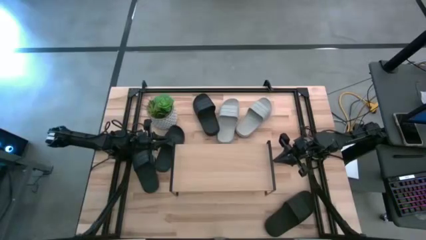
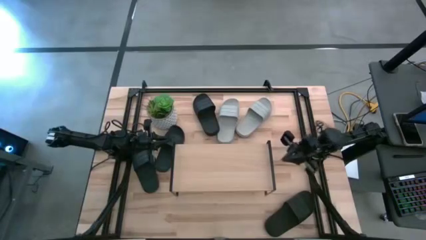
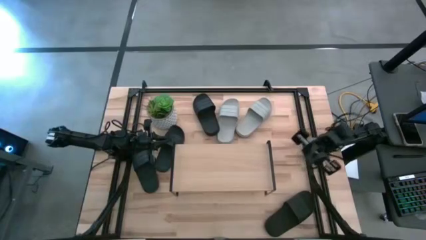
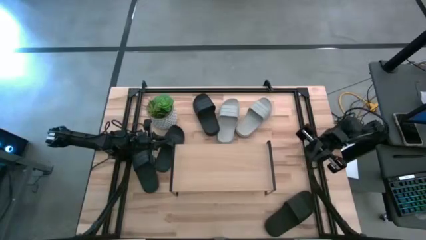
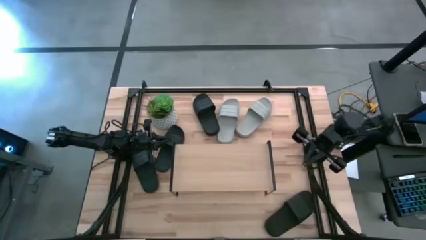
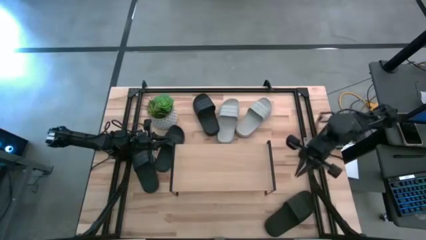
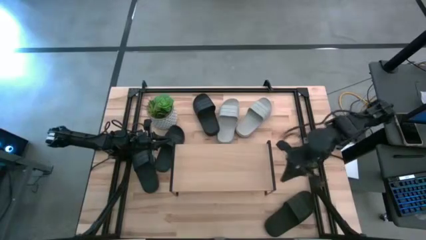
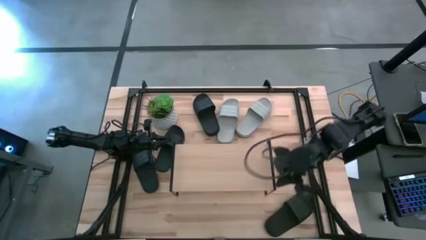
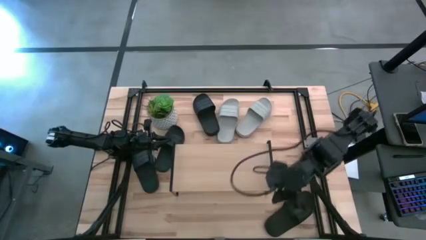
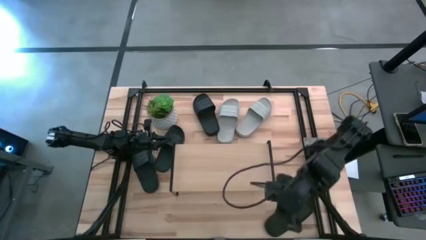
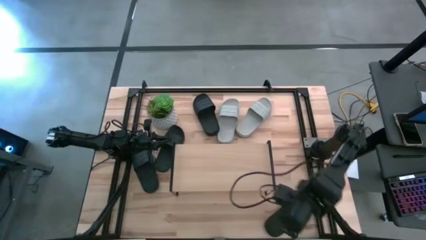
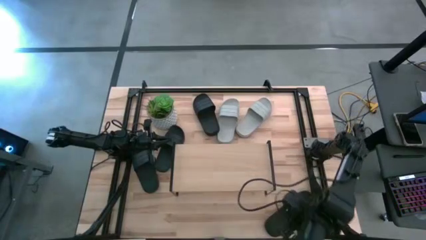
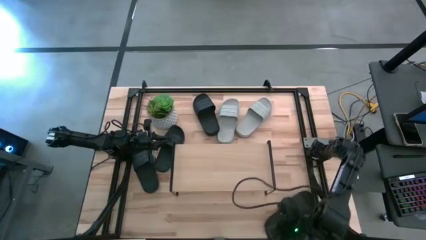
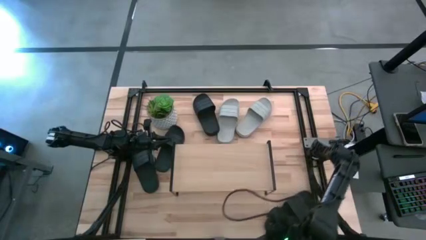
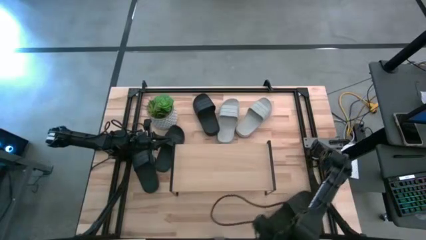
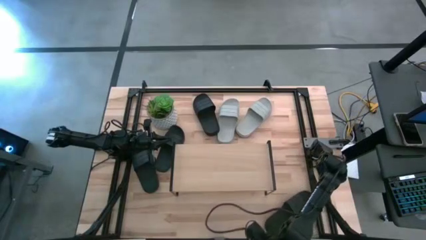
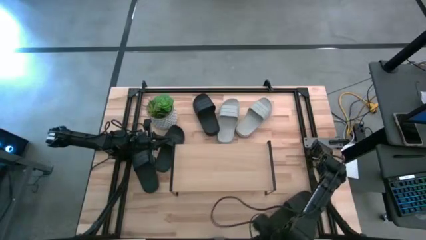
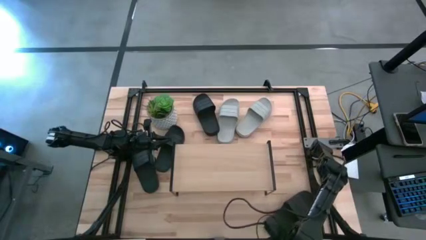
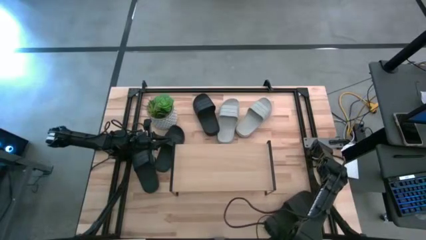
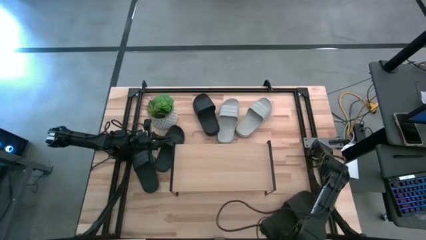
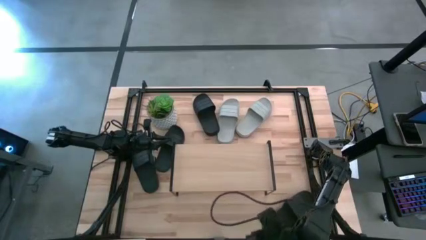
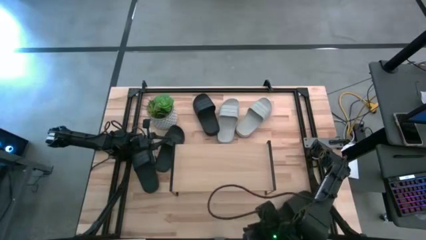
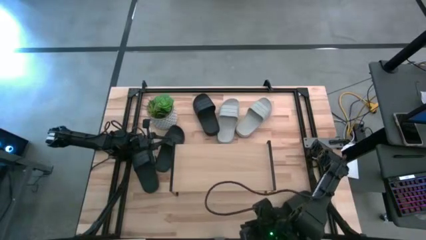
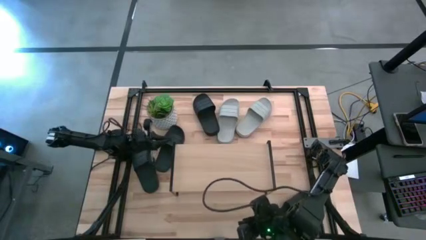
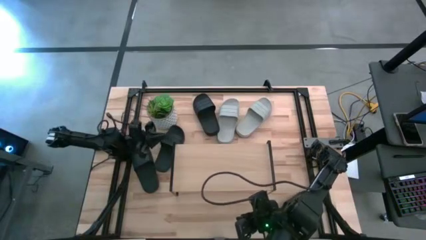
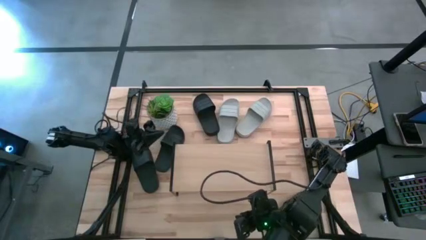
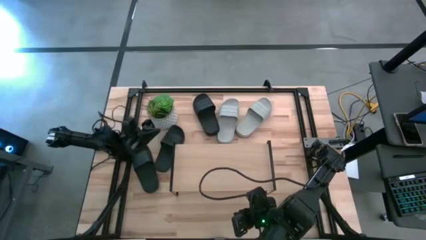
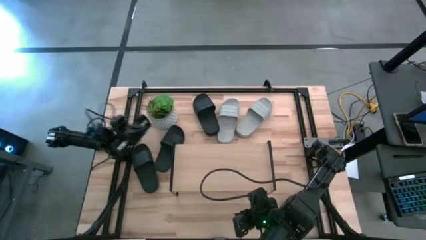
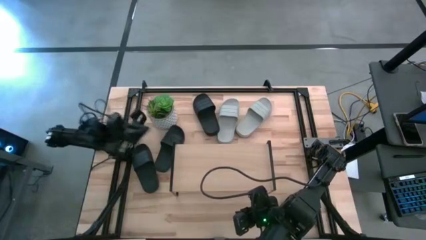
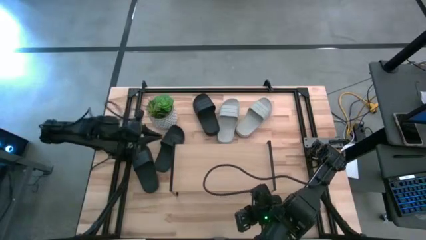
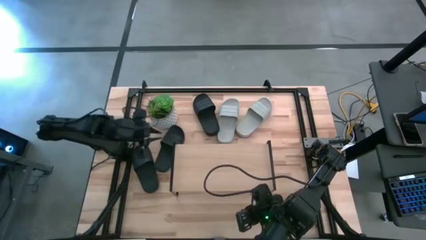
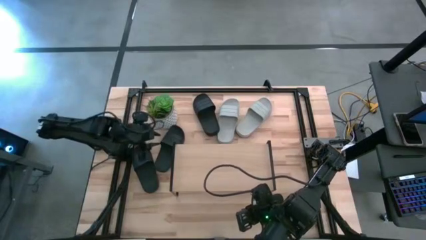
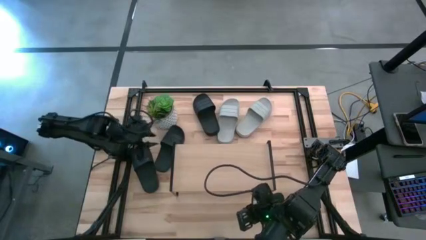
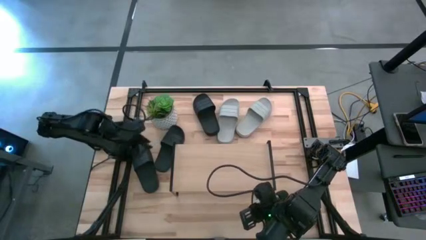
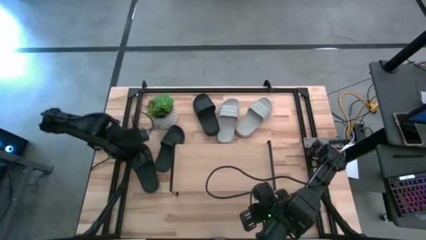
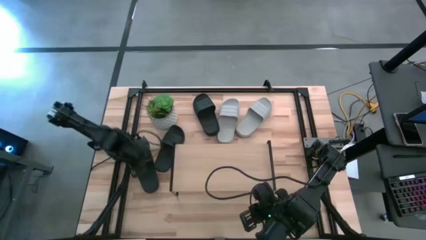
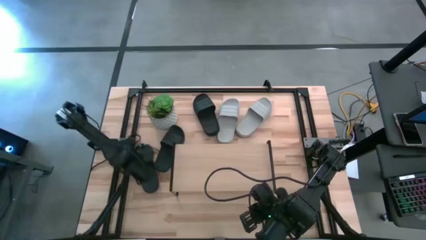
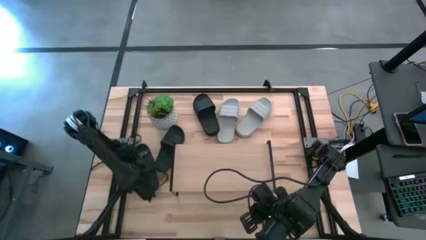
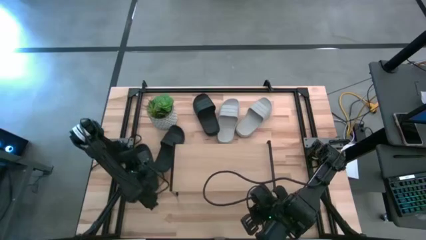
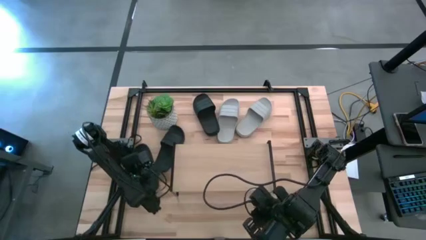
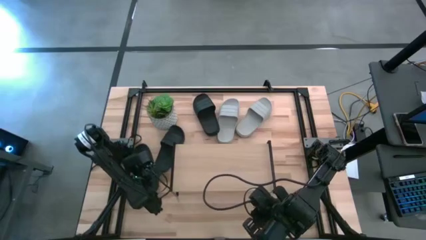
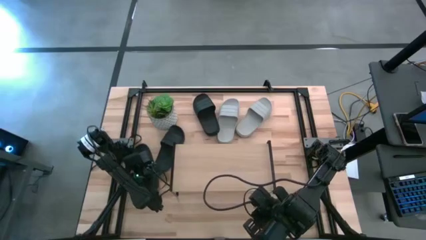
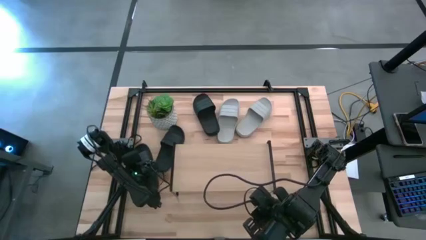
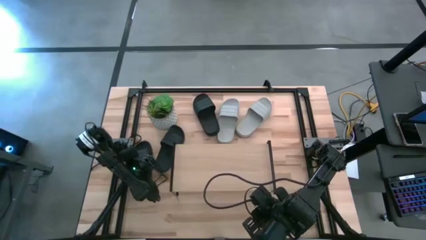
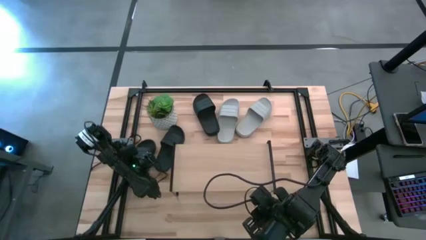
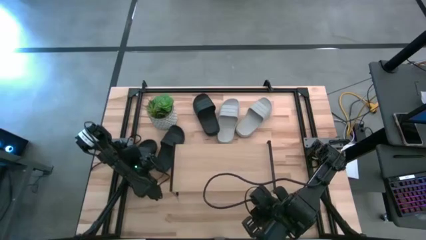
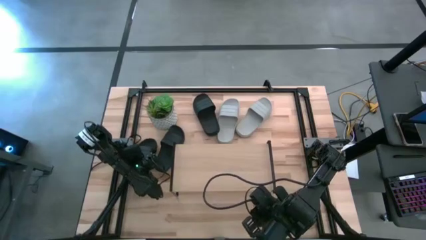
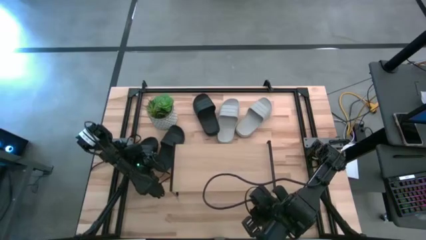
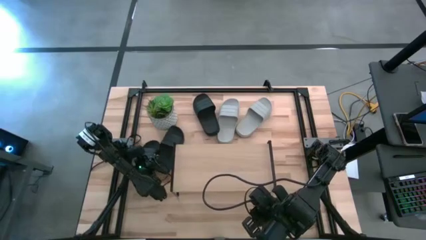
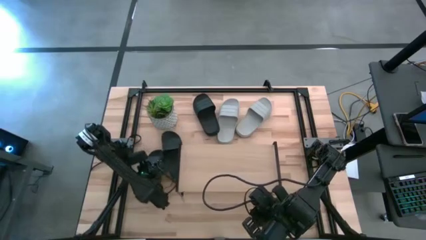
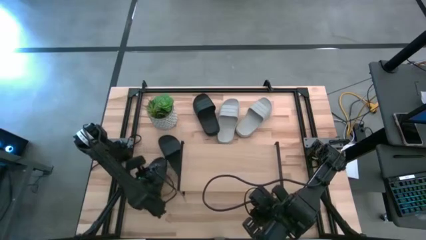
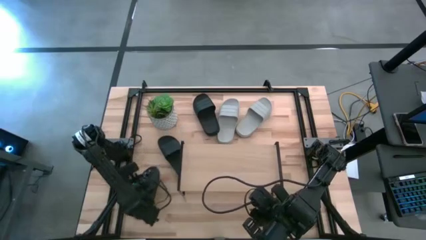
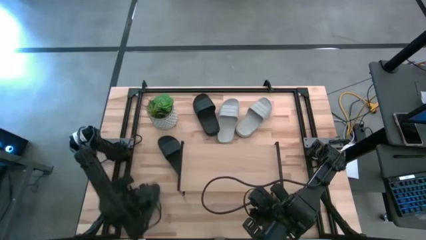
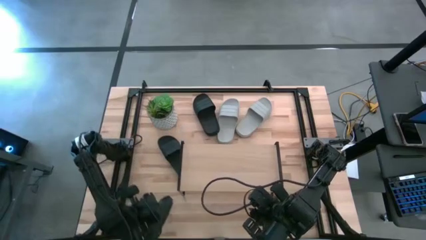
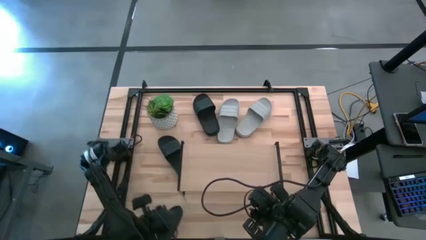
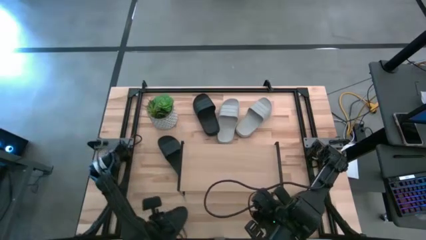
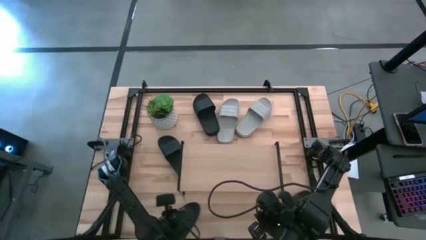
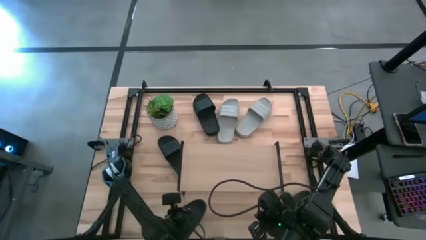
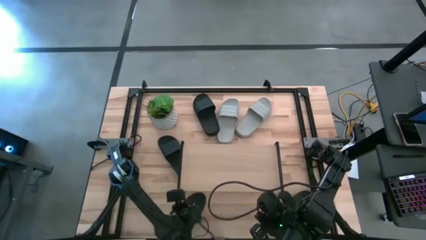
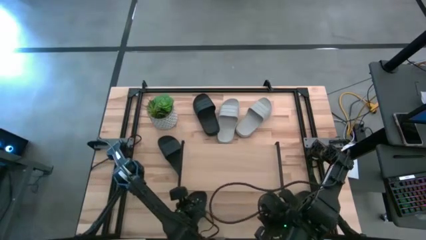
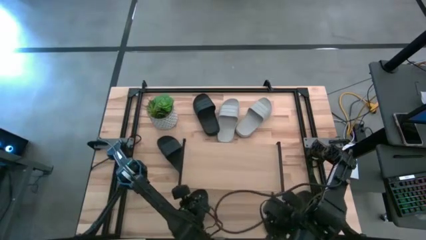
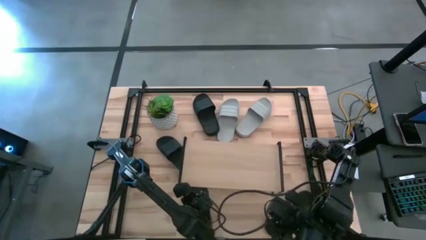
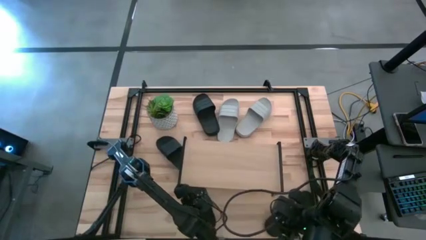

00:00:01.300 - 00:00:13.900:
Task: Pick and place slides into the shelf
Put the black slide under the shelf
